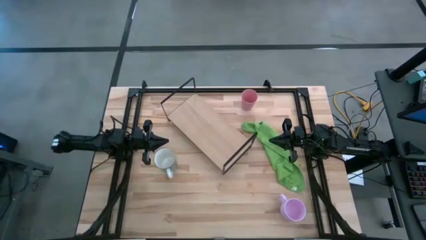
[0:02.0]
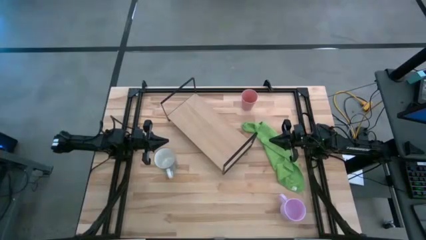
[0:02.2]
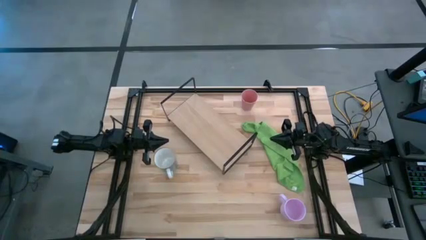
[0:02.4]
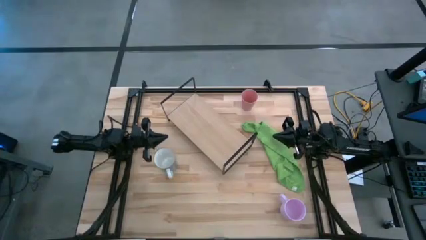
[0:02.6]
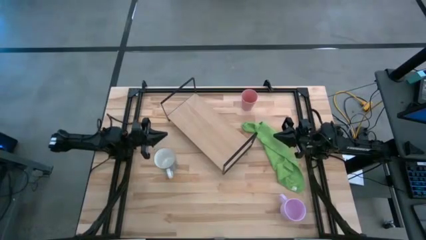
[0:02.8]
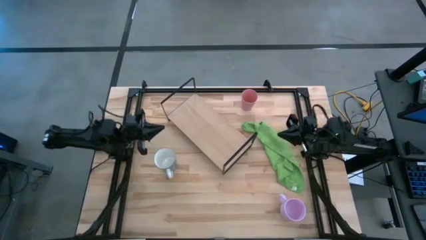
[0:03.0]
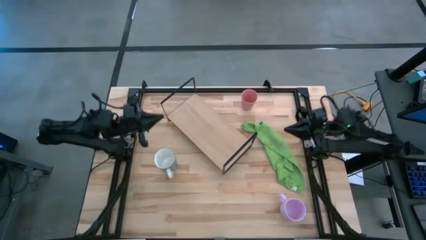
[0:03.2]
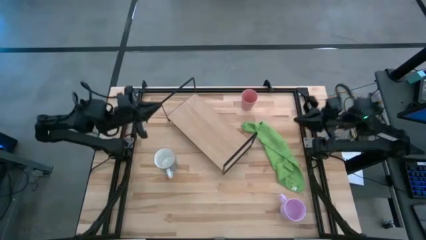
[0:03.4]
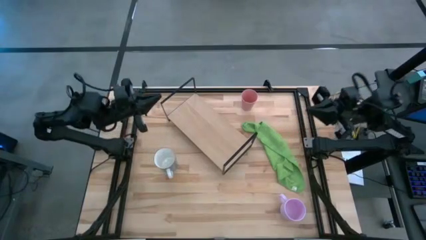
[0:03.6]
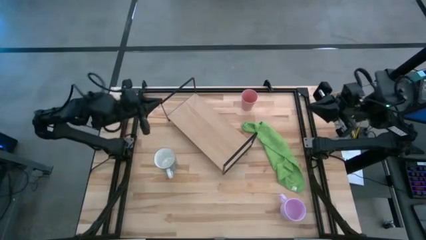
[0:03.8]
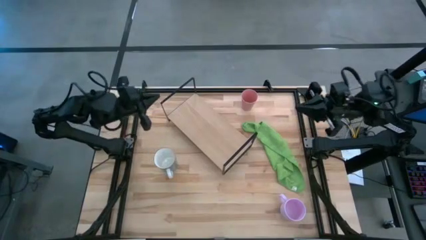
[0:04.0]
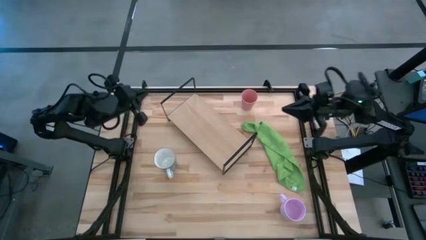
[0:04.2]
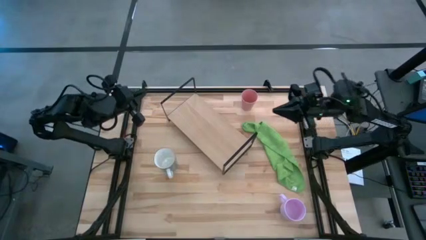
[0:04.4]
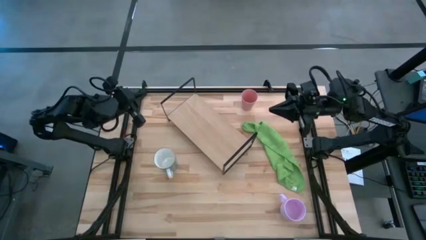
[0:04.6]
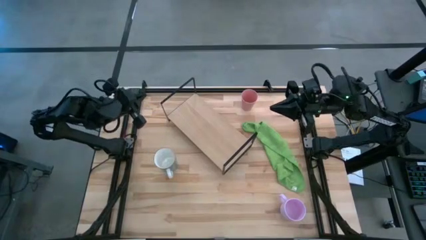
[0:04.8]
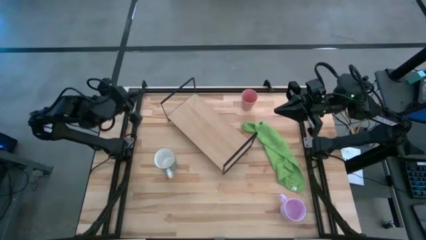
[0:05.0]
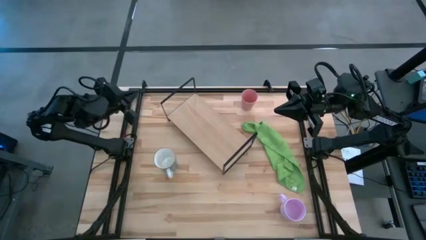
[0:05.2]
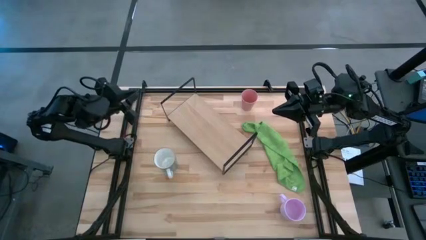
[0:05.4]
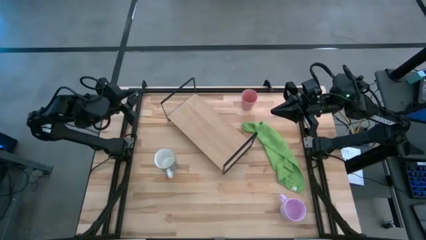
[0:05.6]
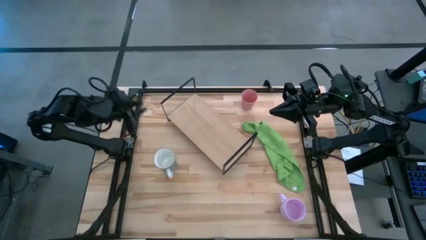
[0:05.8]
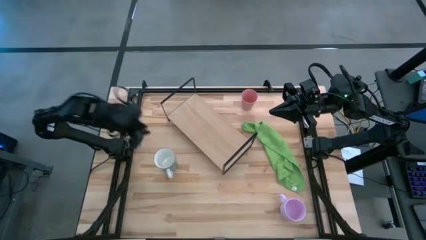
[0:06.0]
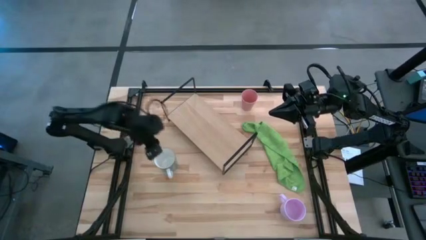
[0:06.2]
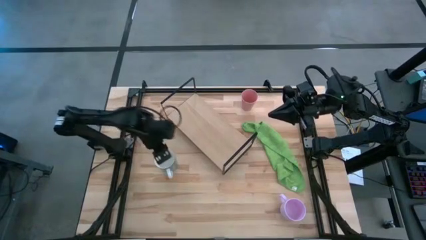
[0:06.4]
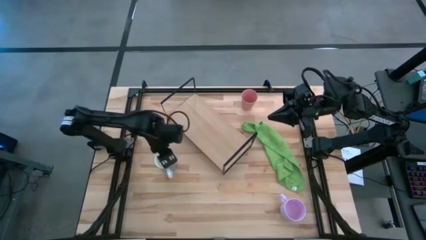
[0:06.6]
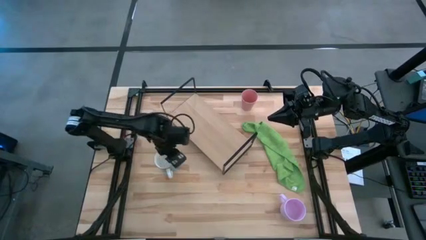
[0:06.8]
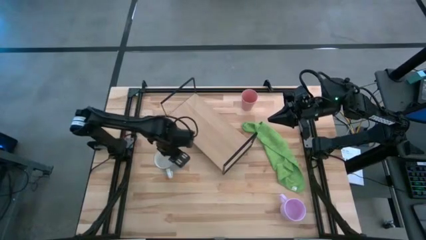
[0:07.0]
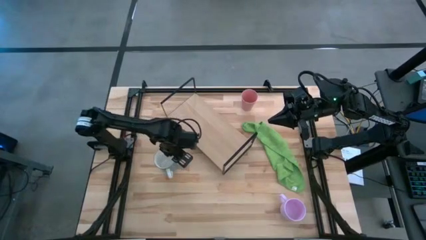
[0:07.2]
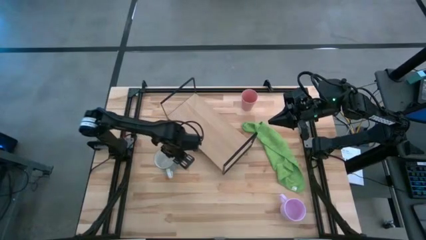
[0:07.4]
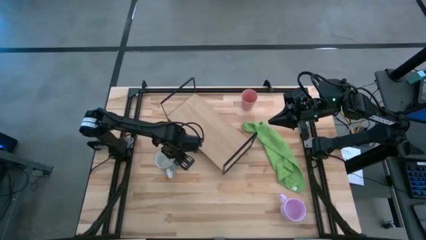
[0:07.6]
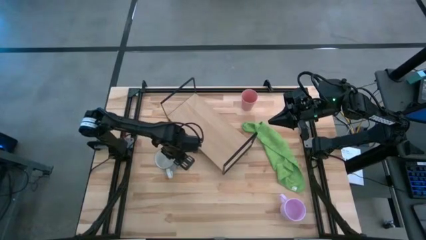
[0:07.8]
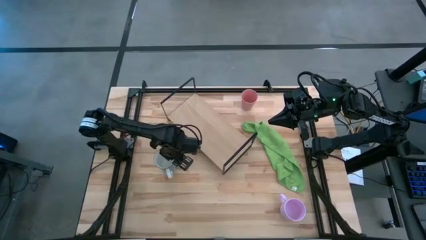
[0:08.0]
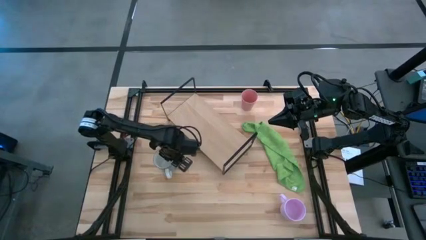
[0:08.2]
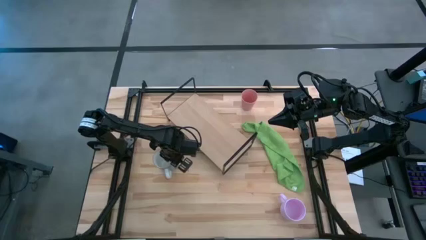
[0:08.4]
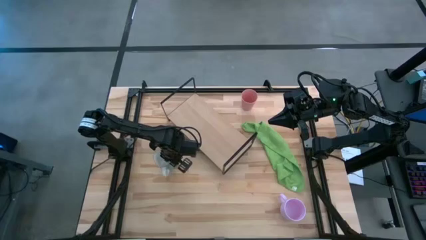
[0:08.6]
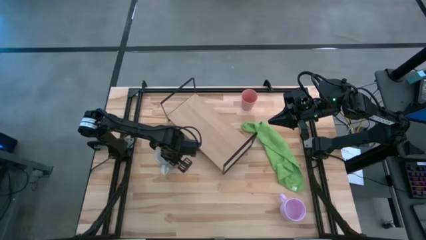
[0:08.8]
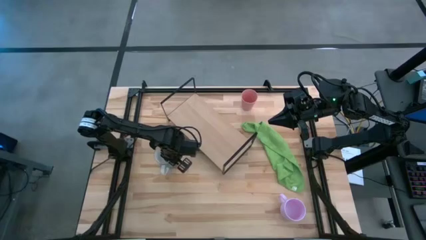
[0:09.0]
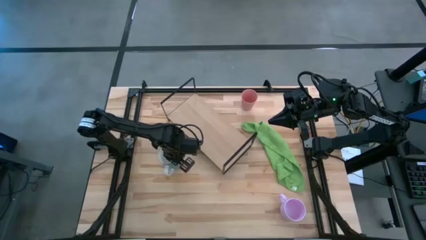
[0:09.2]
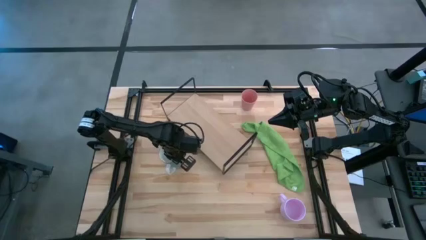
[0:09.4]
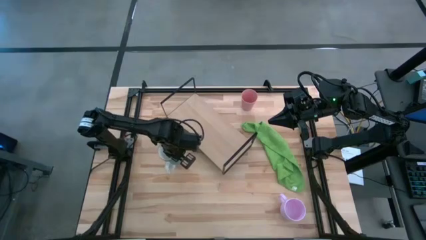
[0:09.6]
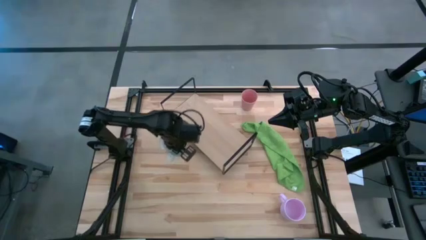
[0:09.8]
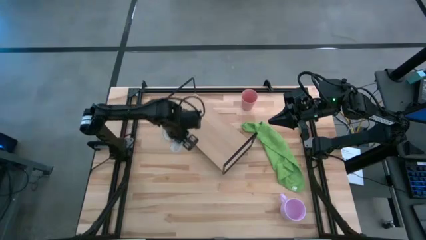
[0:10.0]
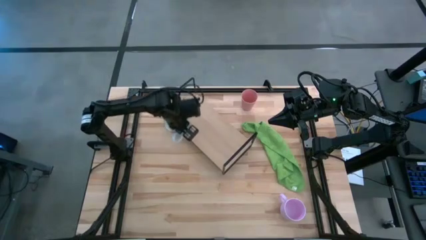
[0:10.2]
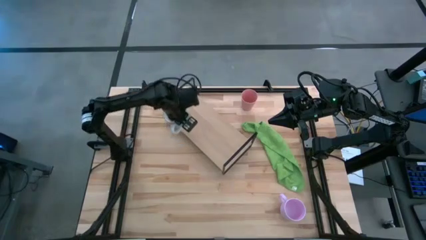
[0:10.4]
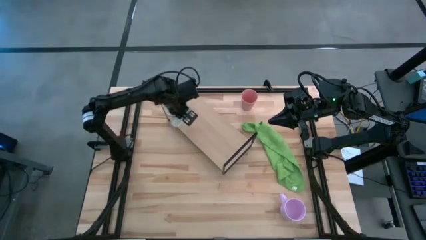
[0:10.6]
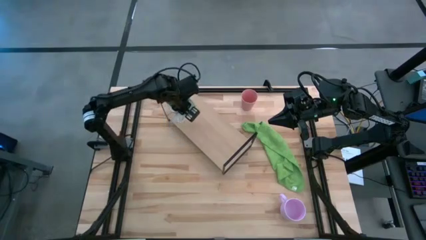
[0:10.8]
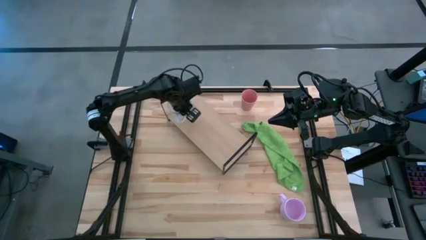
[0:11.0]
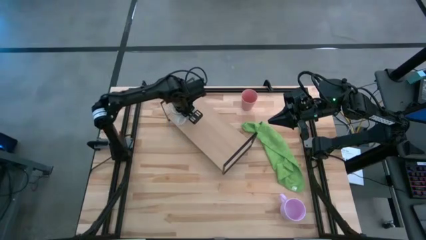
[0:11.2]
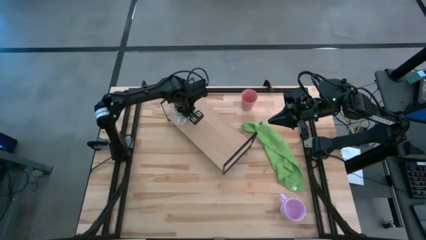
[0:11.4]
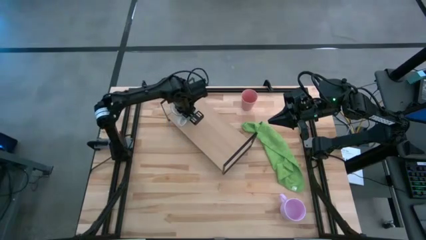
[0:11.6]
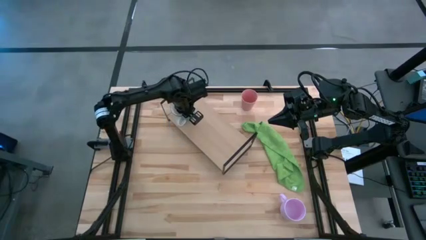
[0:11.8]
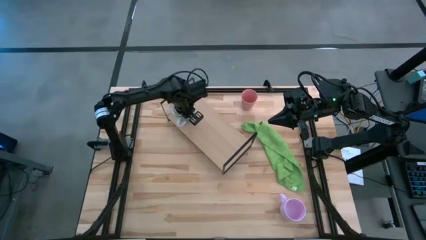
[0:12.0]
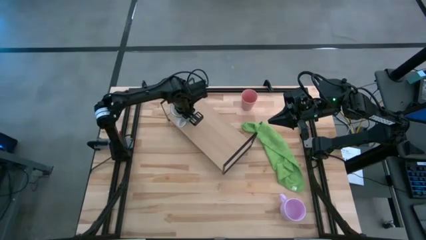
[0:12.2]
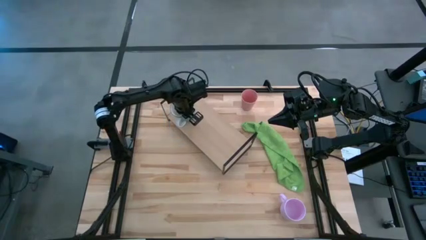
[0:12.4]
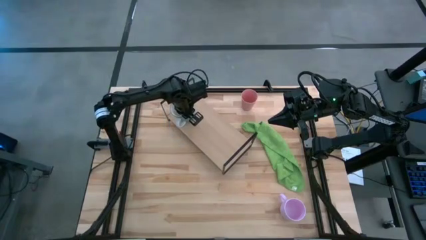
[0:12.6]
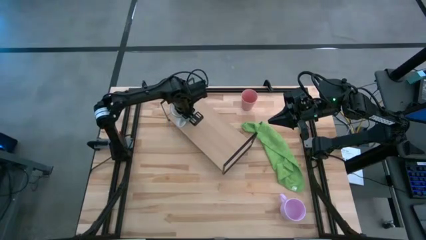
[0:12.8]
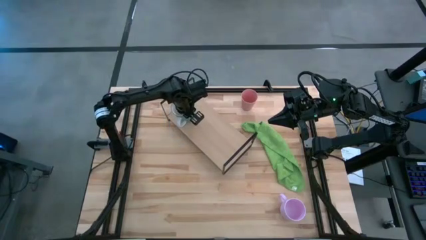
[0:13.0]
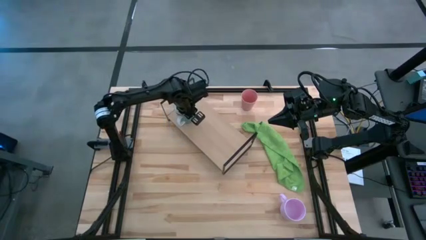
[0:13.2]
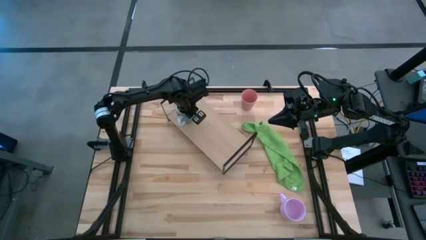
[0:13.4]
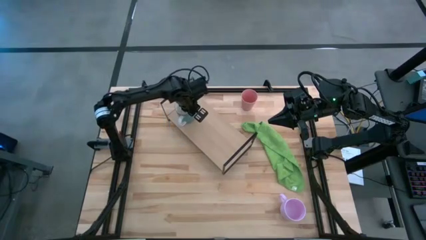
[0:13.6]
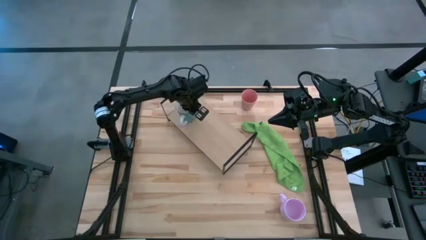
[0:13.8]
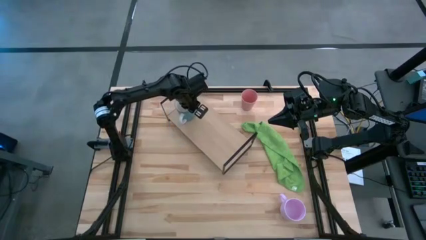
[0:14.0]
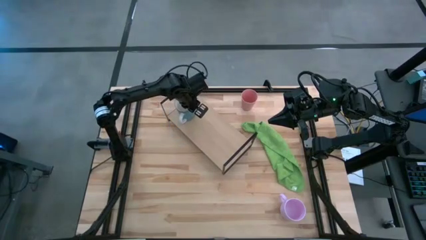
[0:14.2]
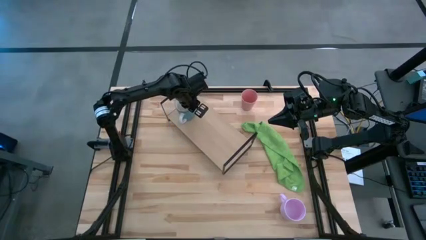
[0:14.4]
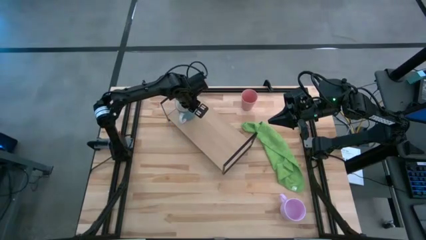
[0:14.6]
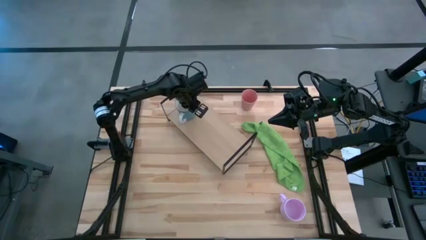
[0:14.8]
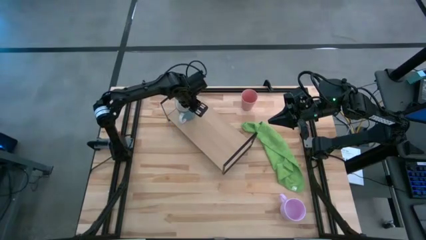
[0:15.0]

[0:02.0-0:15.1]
Task: Stack small to large cups/mugs on shelf
Put the blue mug on the shelf
